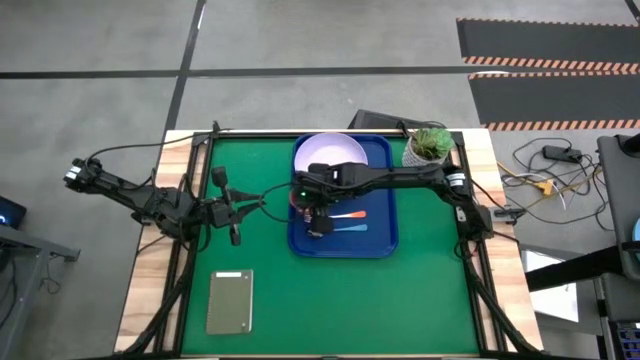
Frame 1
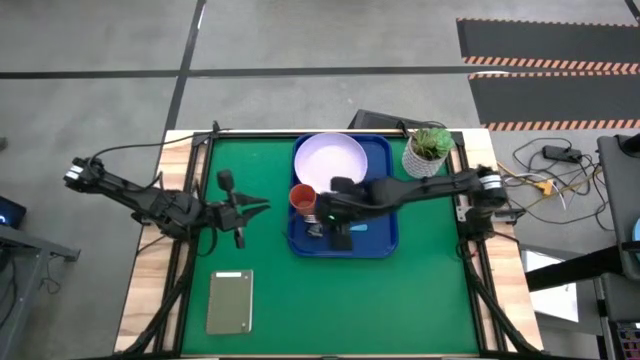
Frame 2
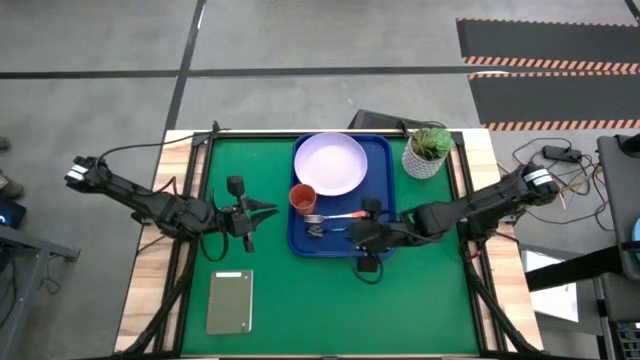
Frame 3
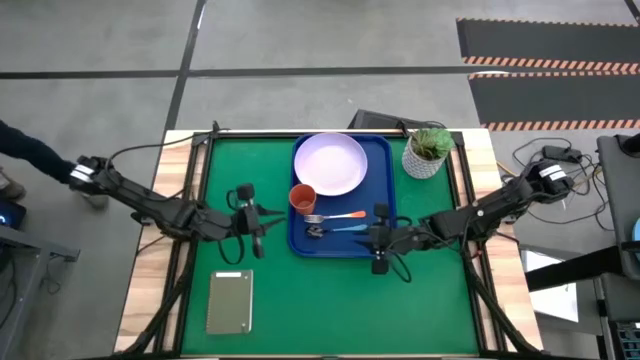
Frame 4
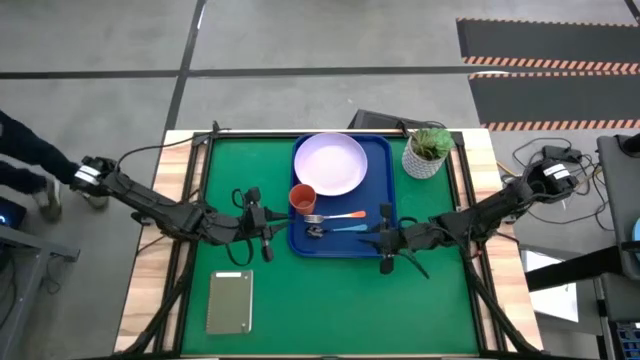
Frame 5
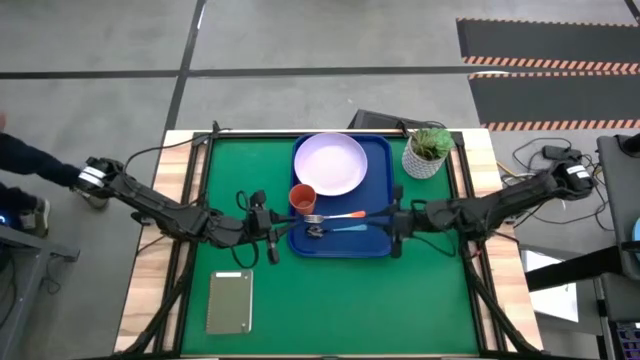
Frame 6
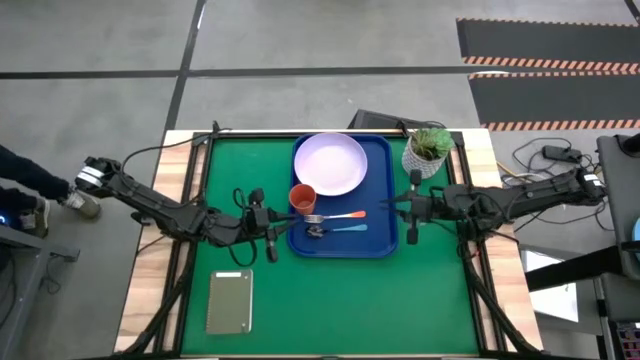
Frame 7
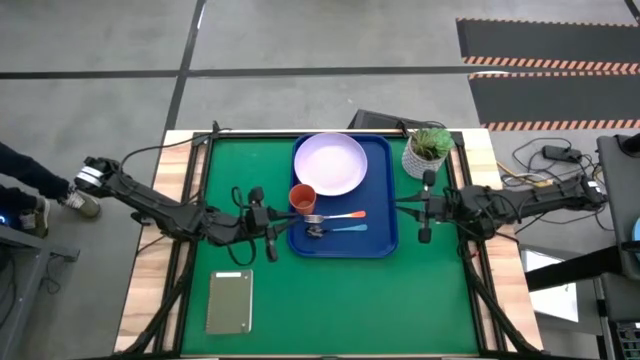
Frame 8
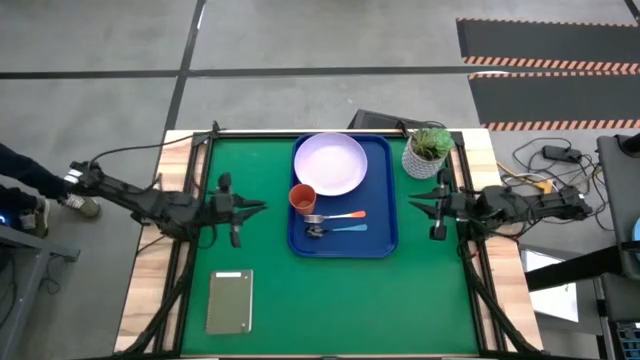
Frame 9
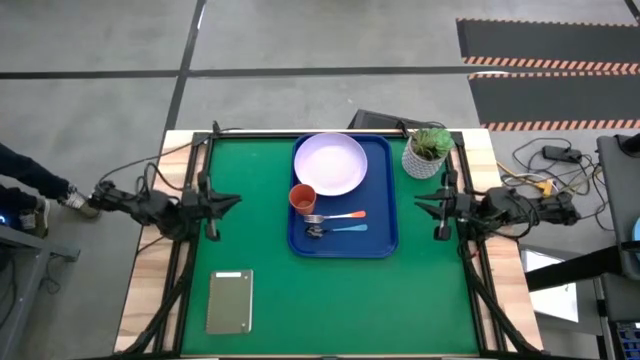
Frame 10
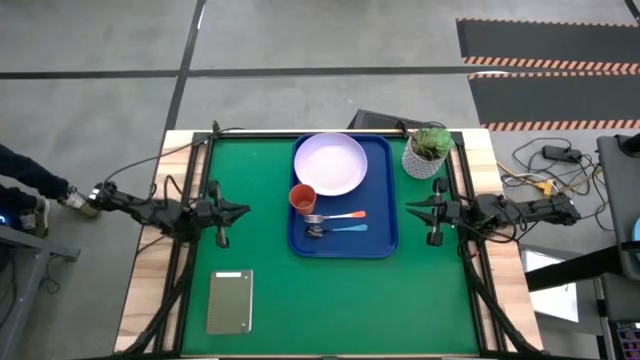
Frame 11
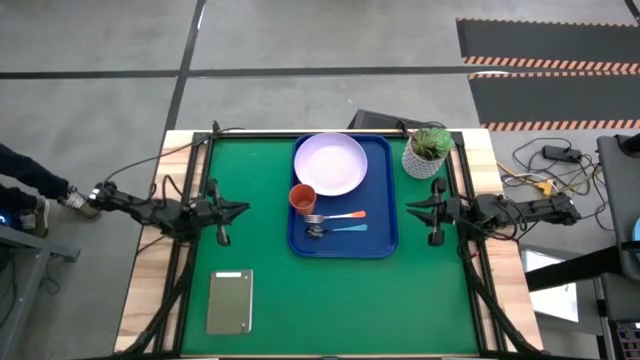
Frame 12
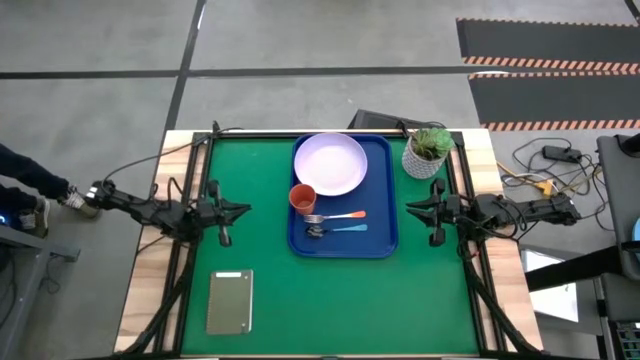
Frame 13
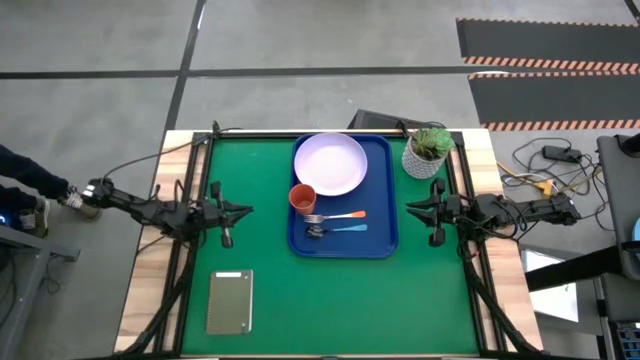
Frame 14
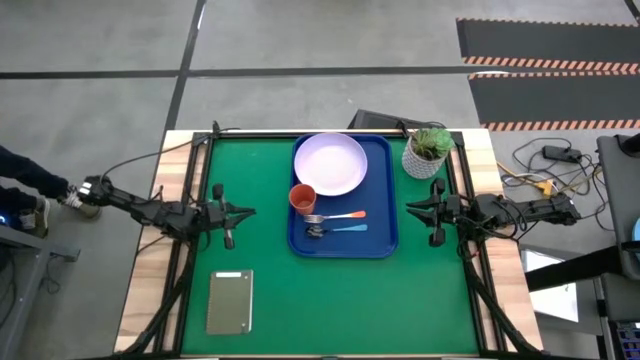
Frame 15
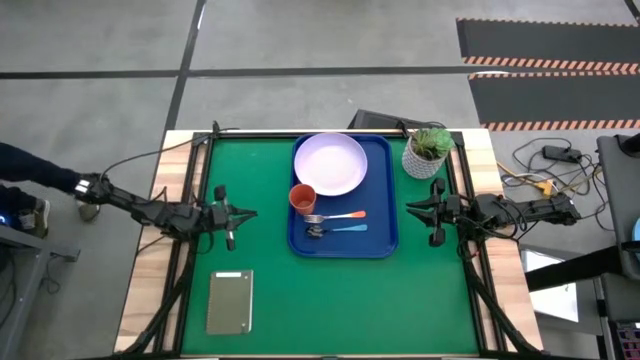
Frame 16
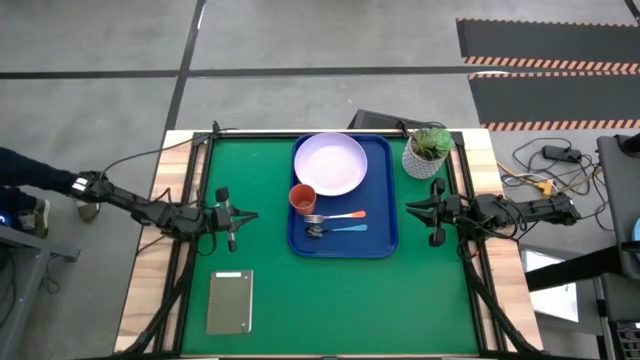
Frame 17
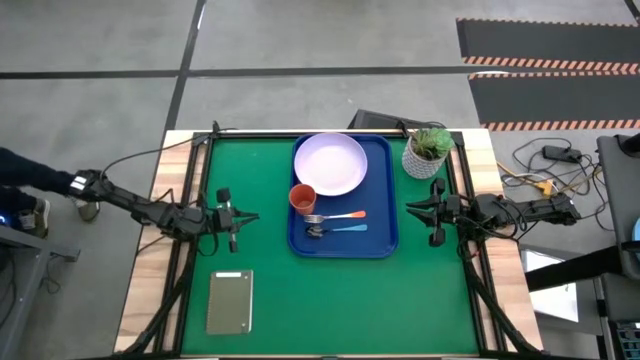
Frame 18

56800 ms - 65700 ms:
Task: Pick and place plate/cup/fork/spoon on tray
Return to Home Position

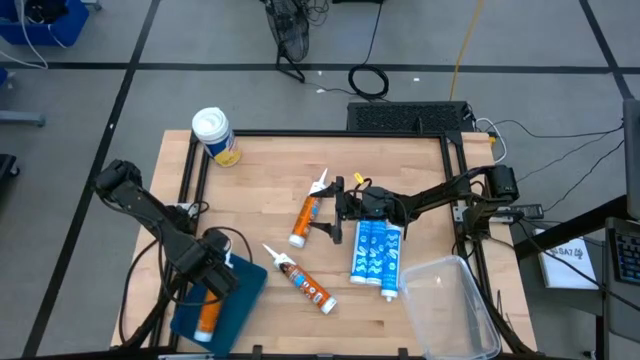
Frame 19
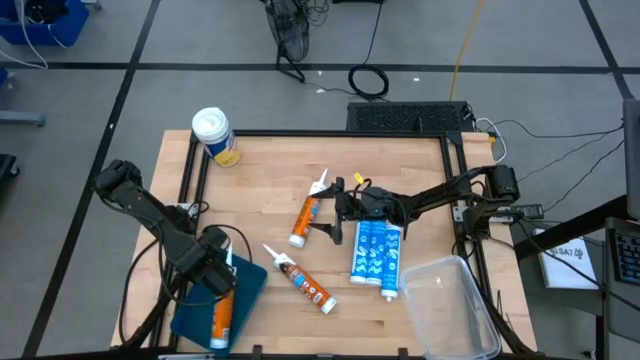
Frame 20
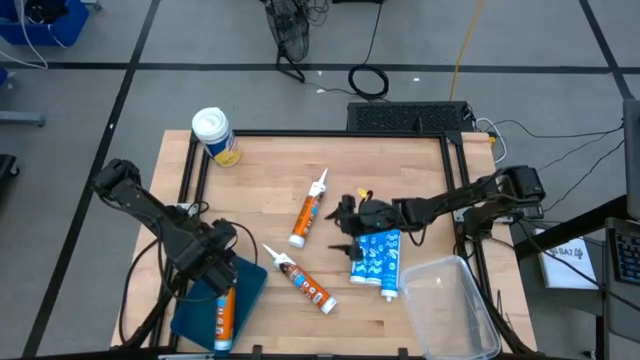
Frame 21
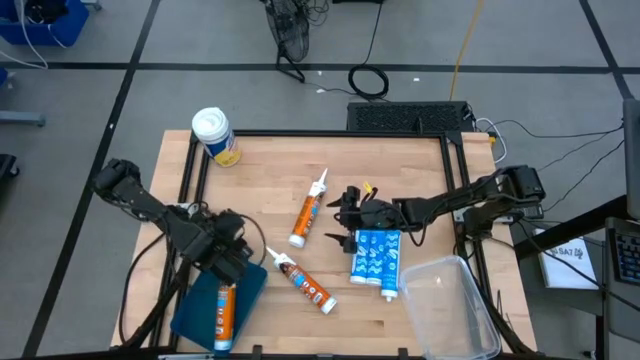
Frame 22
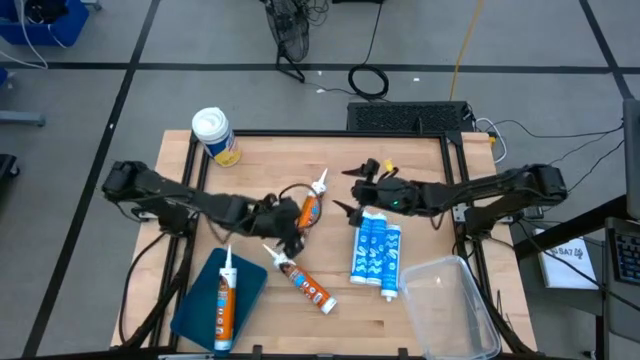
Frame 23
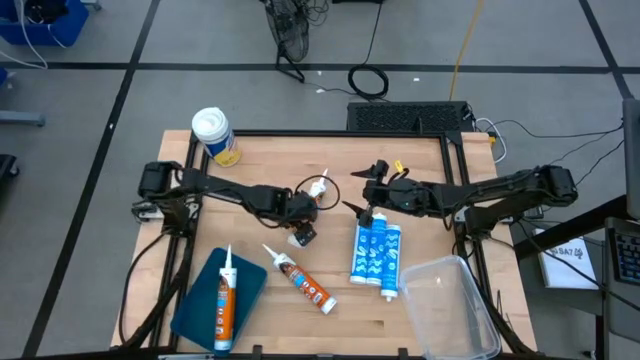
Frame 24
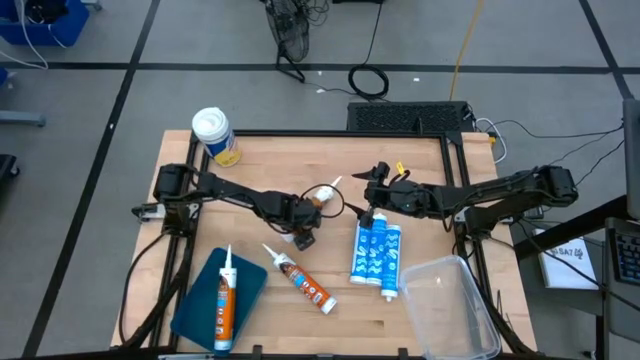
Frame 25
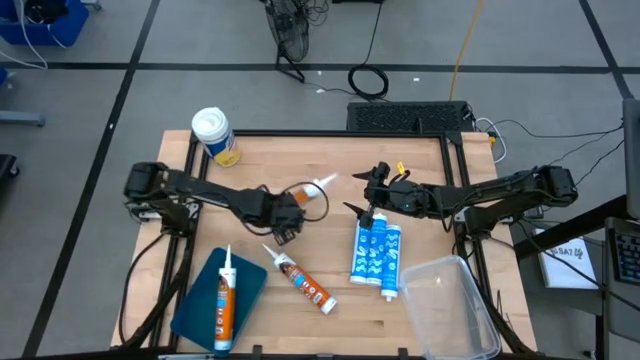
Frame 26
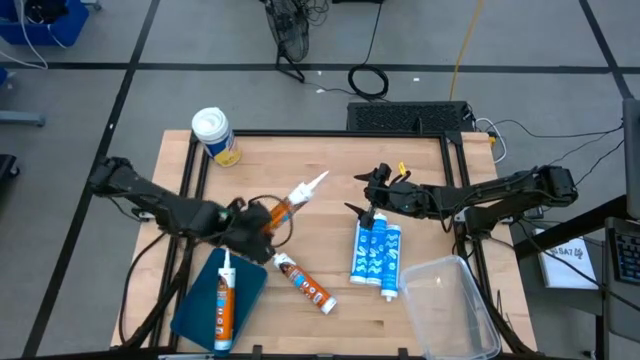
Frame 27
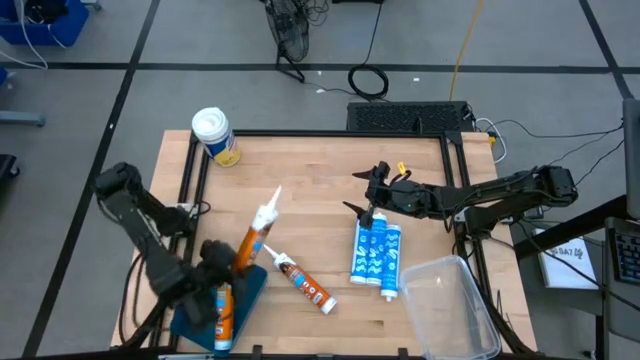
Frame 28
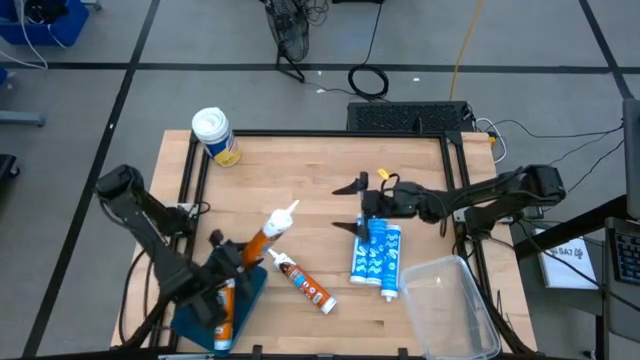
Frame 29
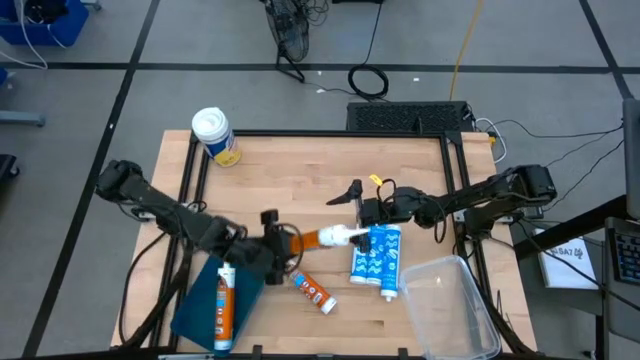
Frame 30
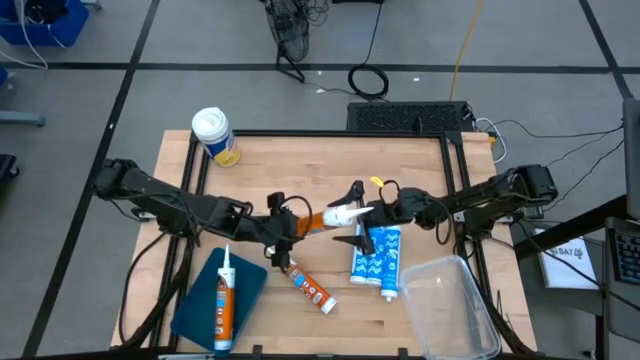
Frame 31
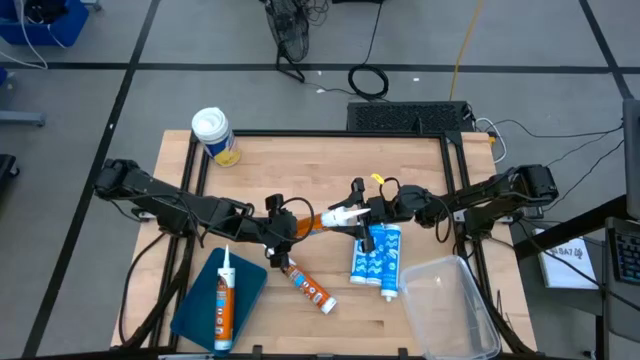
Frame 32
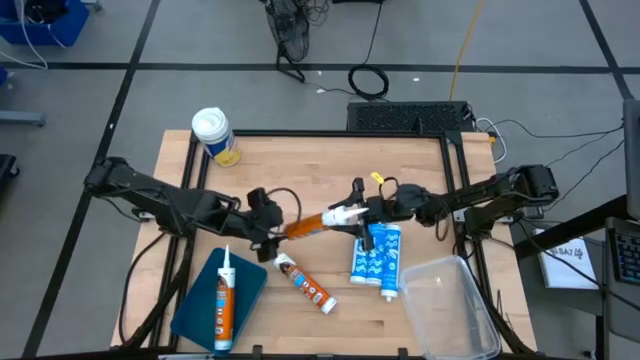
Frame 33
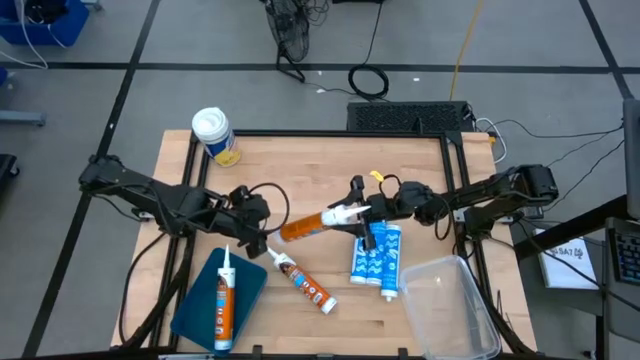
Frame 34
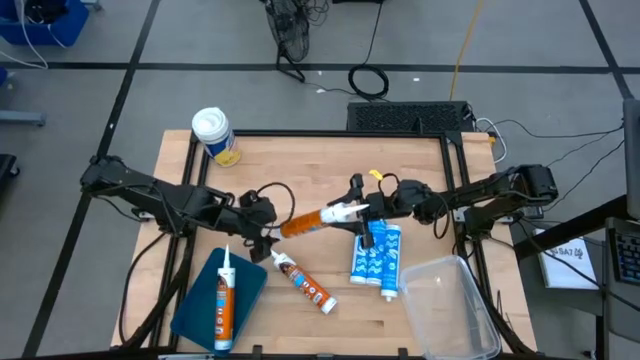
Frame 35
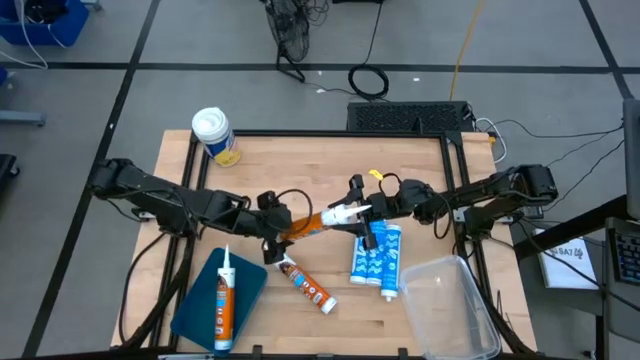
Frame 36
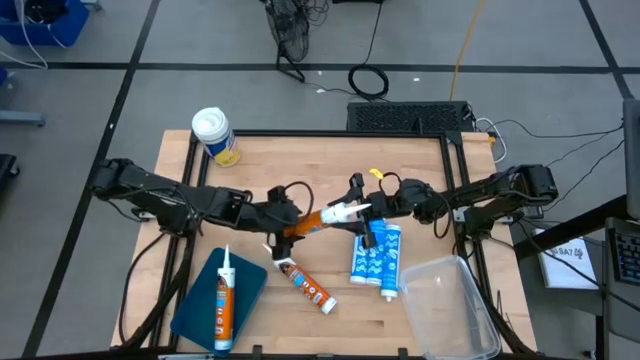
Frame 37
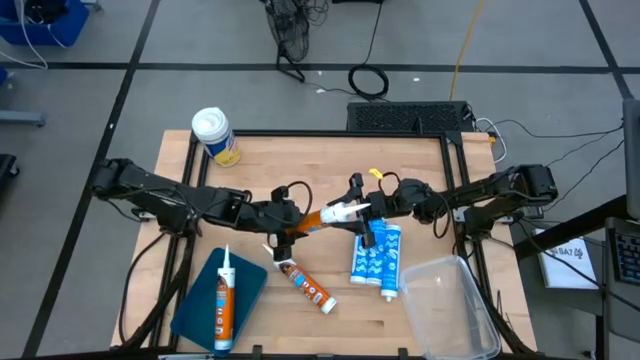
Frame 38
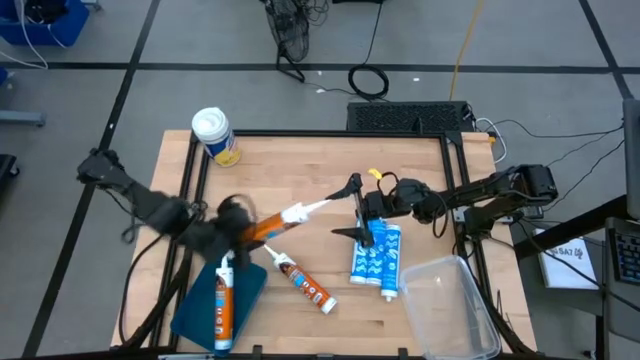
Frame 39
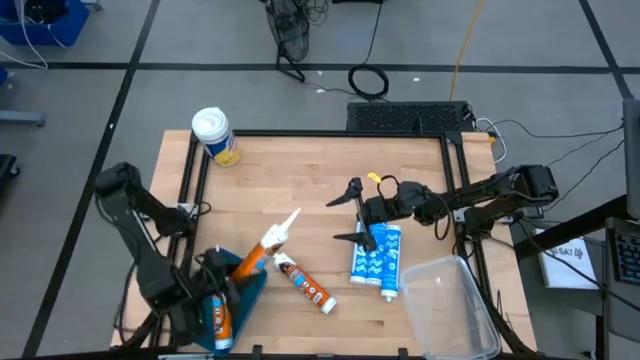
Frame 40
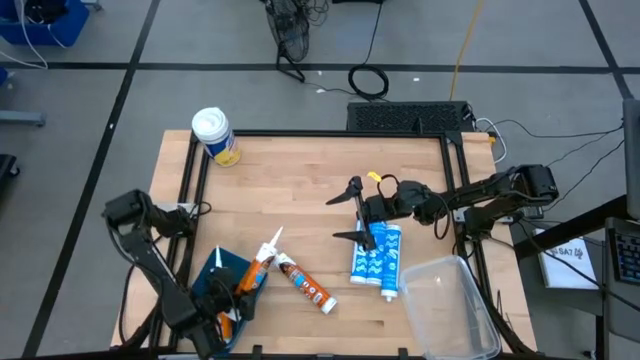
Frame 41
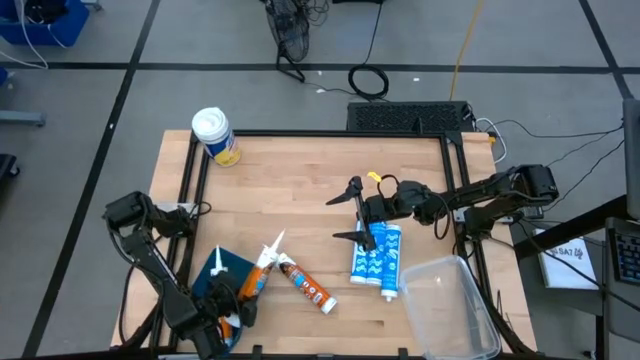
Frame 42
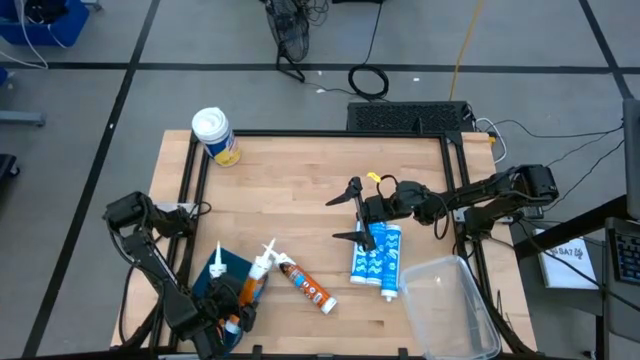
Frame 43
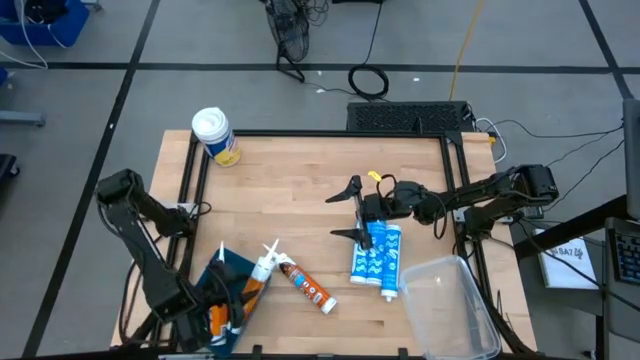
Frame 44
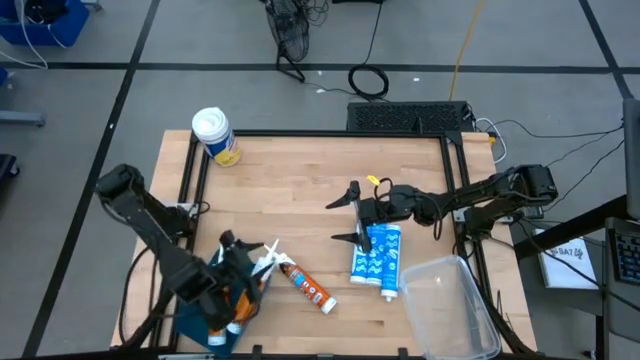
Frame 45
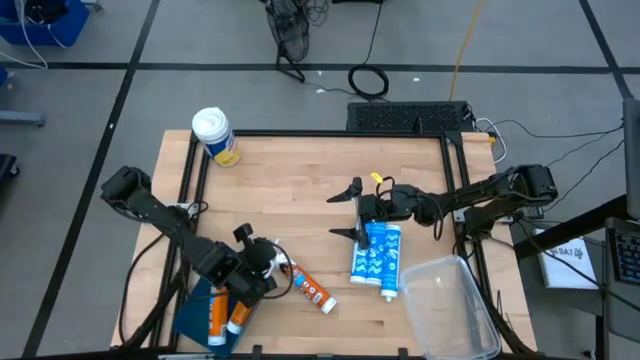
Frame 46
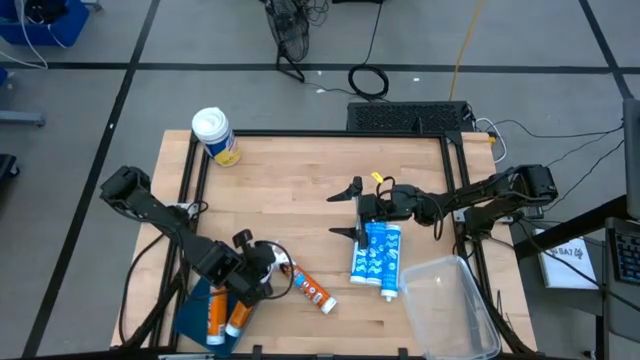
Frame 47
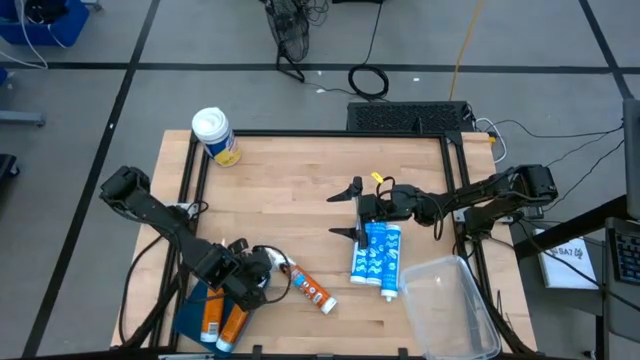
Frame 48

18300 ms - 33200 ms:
Task: Pick & place silicon tubes, Sealant and Lysol wipes
Put the top orange sealant into the blue bin
